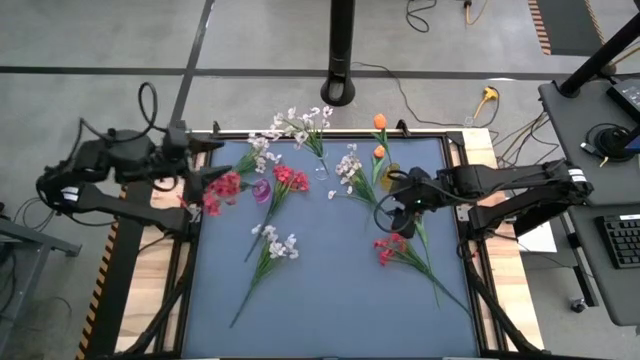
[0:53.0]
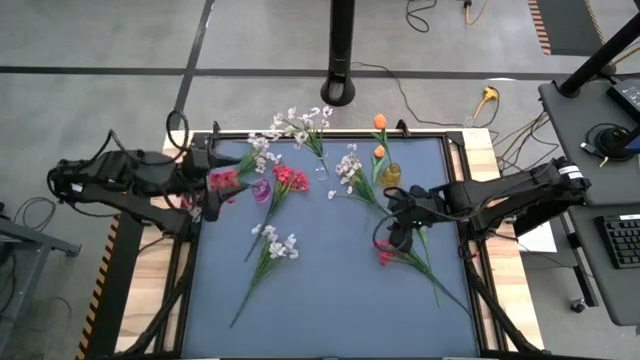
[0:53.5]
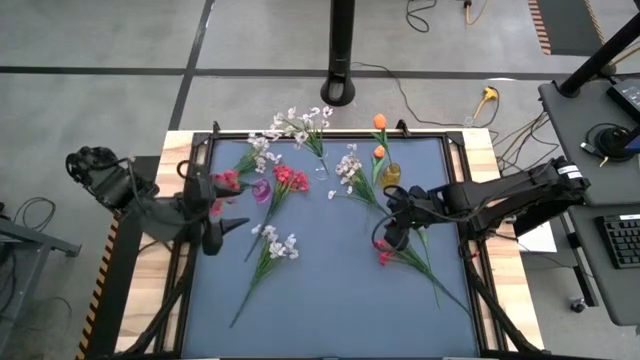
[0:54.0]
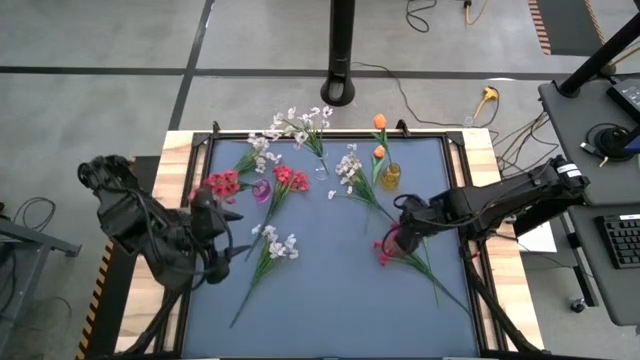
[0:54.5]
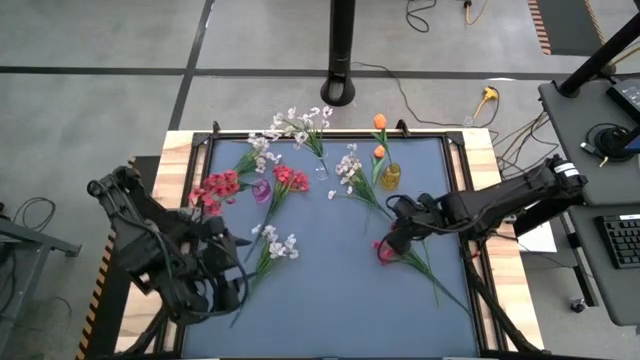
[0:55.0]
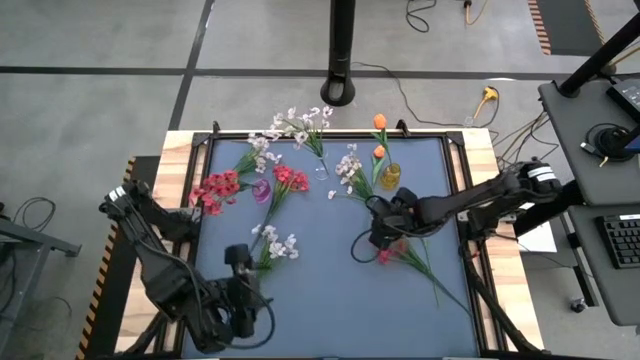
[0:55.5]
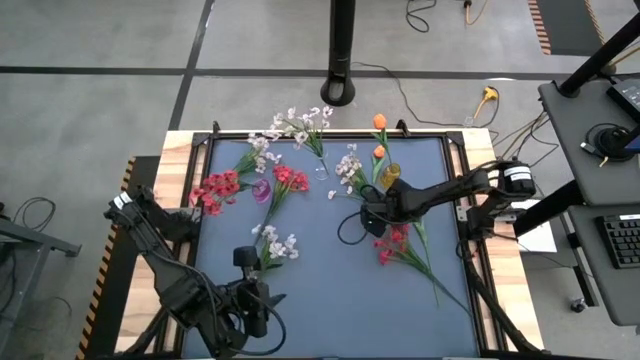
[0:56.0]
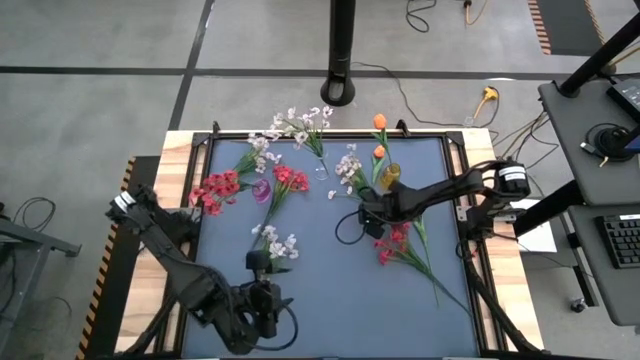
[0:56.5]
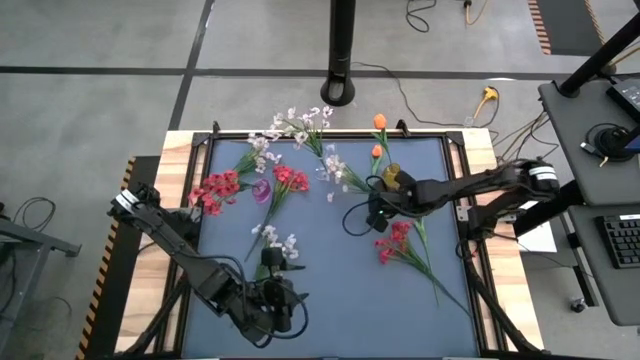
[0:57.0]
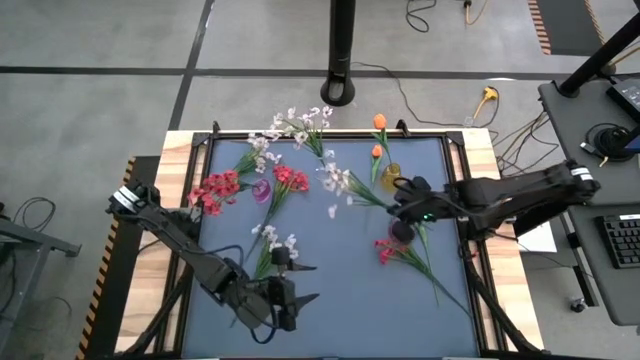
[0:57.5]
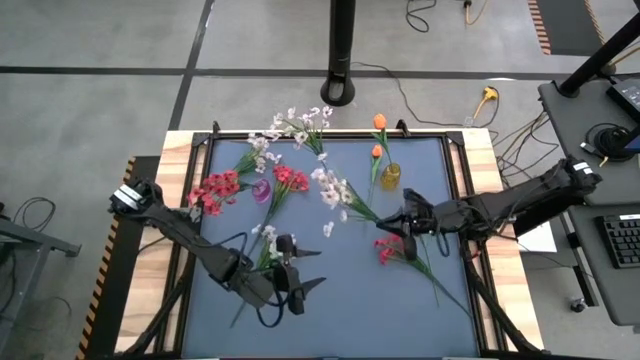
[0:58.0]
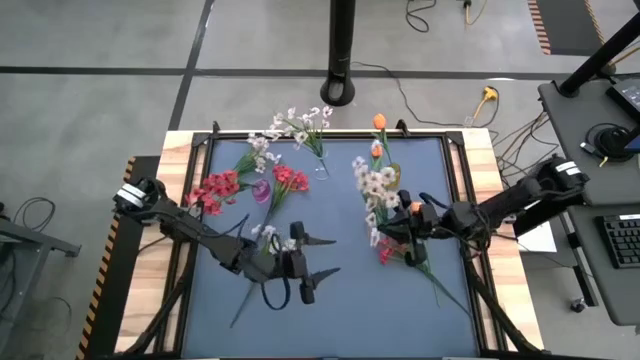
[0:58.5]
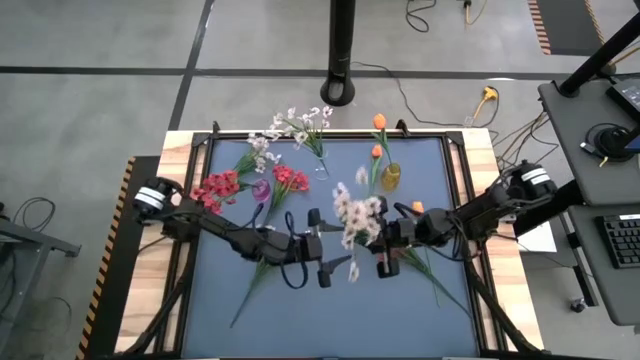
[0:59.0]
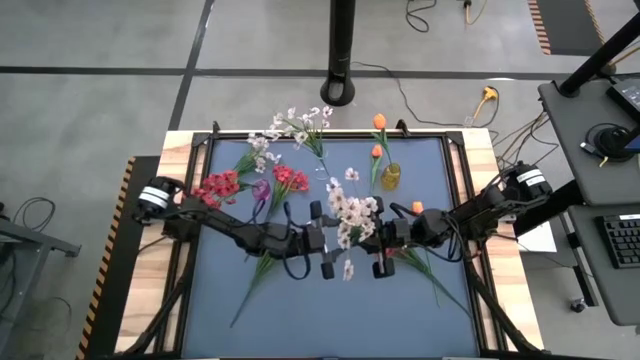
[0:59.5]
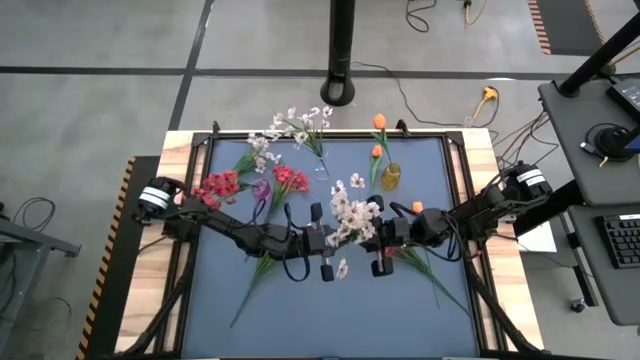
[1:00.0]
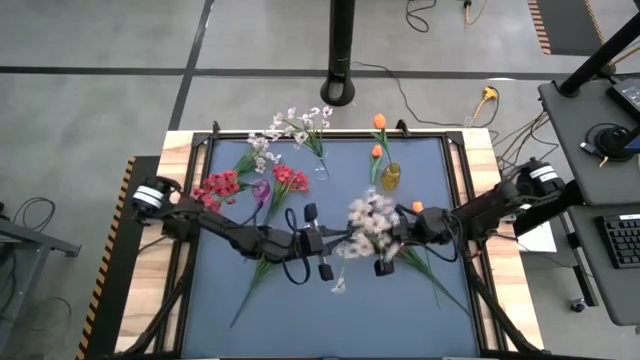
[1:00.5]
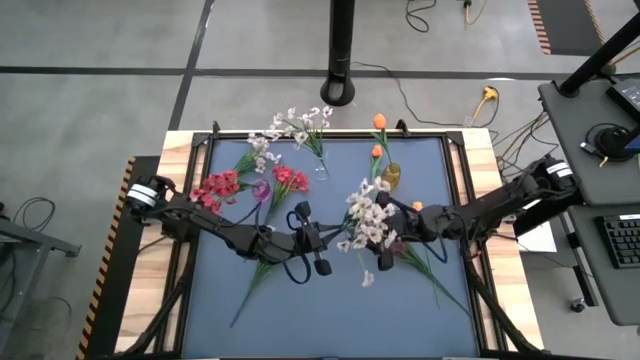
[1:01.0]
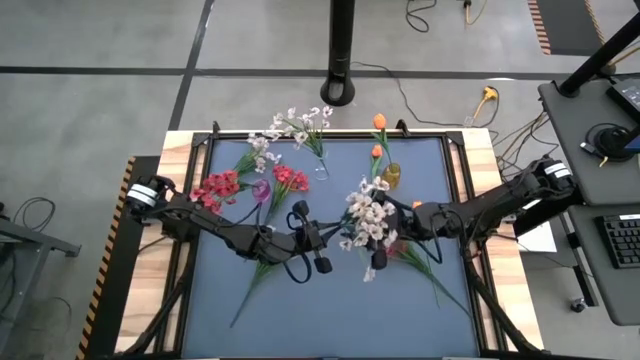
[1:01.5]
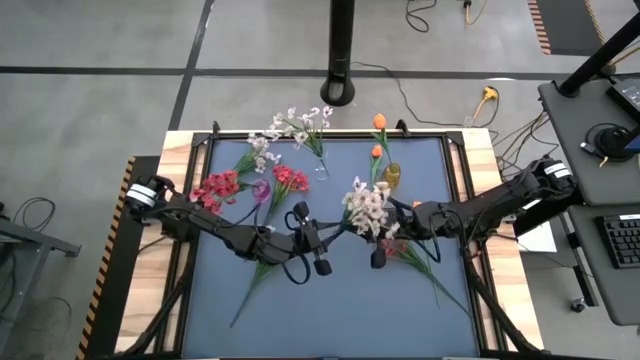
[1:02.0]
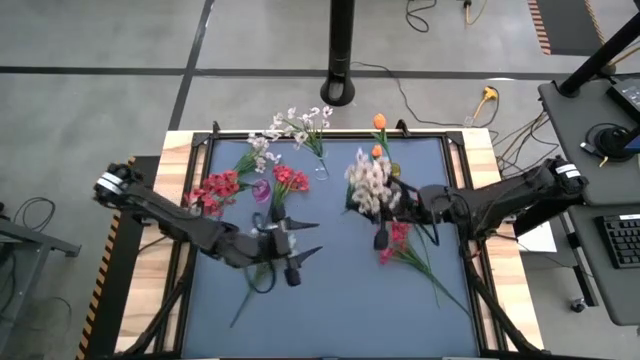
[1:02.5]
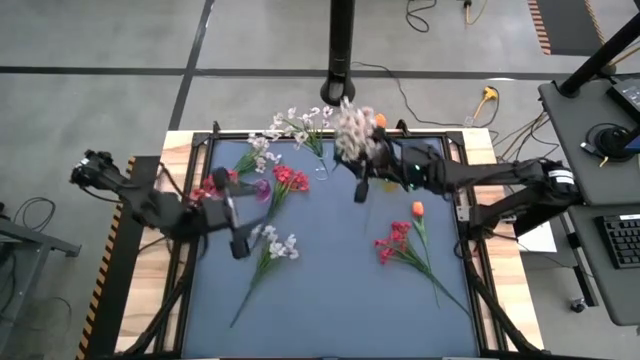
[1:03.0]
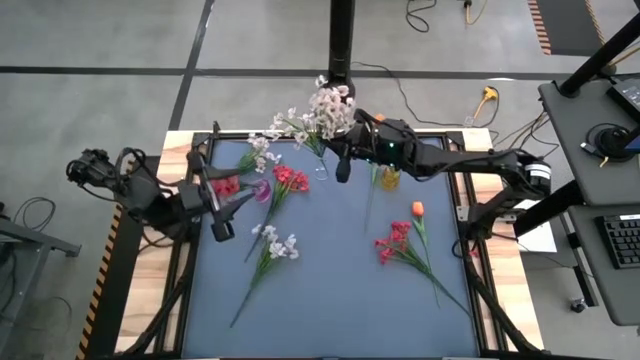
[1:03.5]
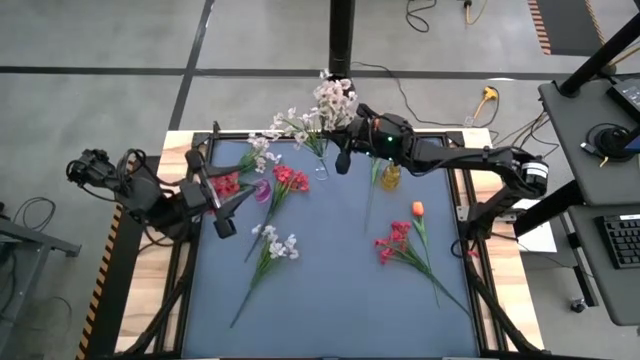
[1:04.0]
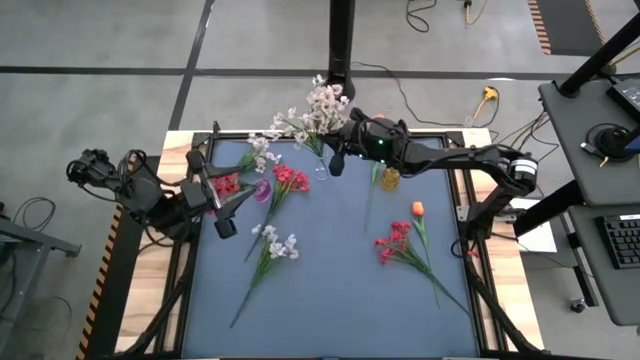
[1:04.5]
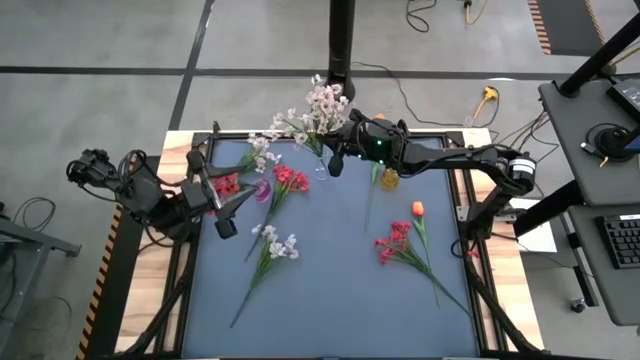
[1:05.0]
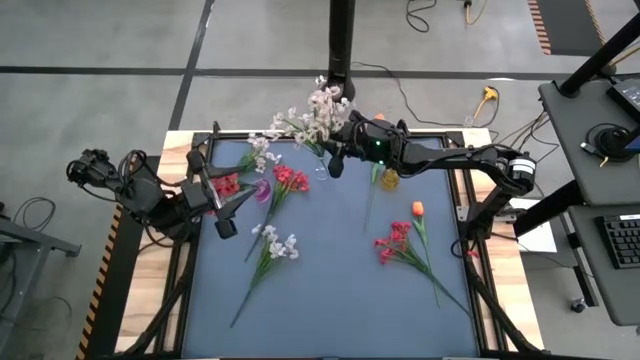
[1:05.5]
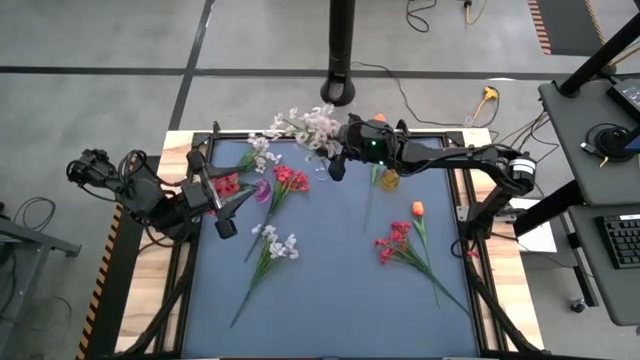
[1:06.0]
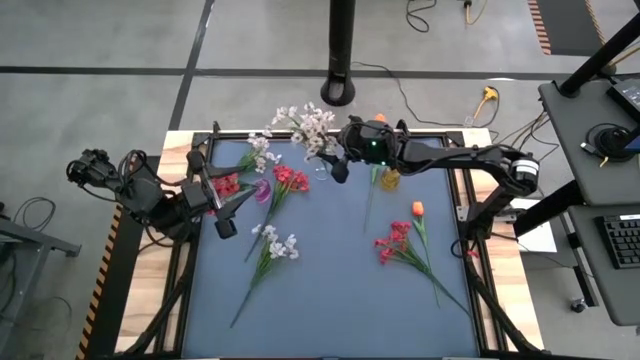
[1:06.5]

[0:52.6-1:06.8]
Task: Sort flowers into vase by color
Put the white flower into the transparent vase

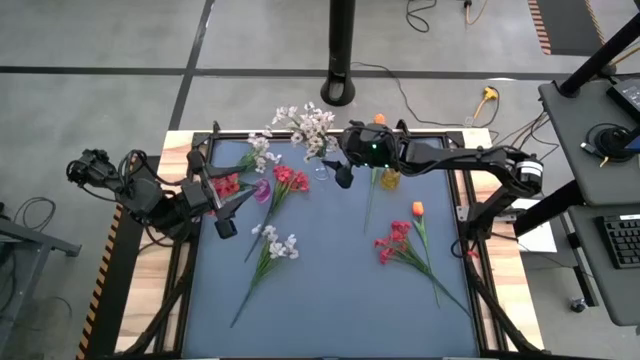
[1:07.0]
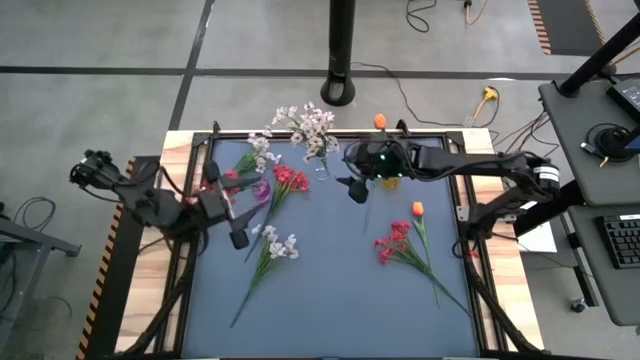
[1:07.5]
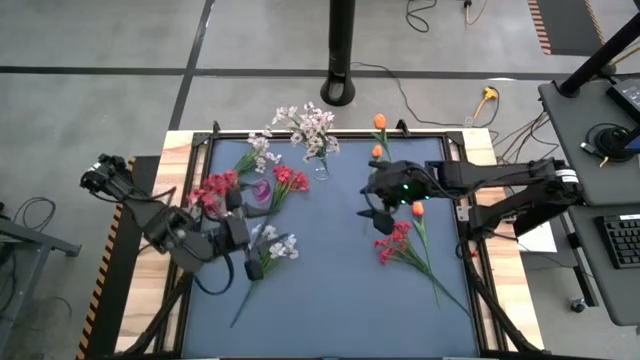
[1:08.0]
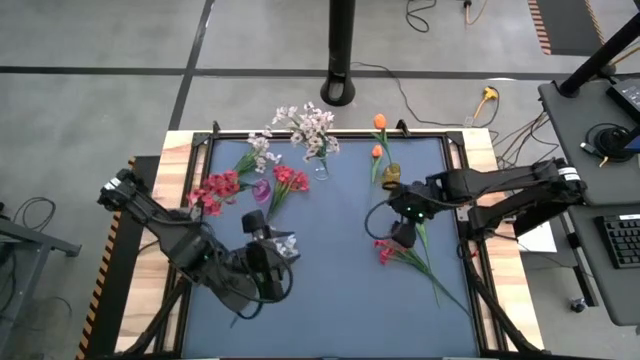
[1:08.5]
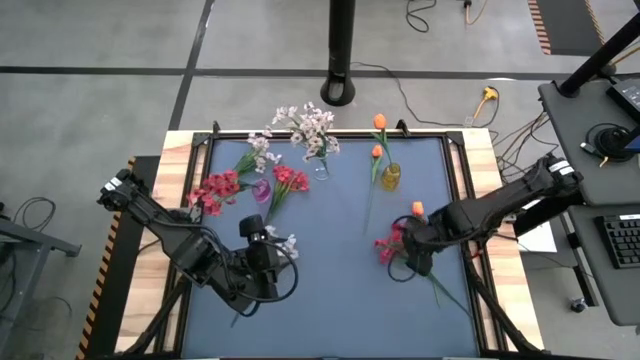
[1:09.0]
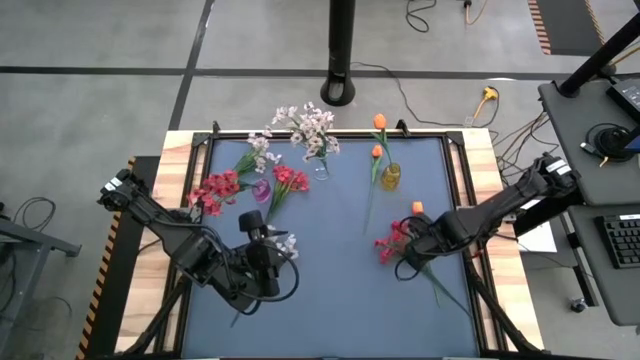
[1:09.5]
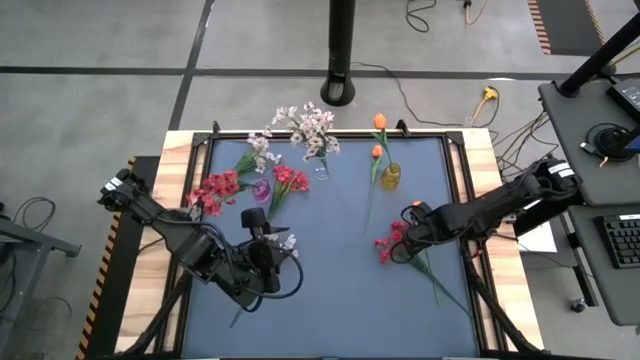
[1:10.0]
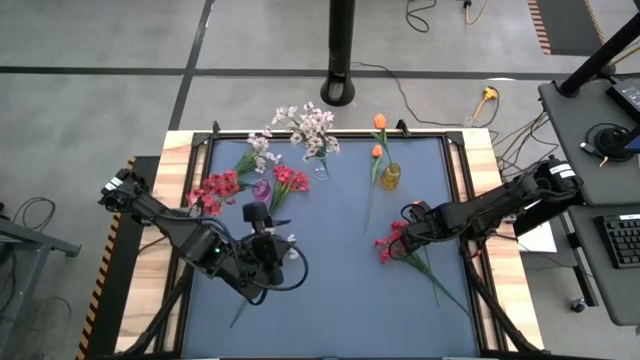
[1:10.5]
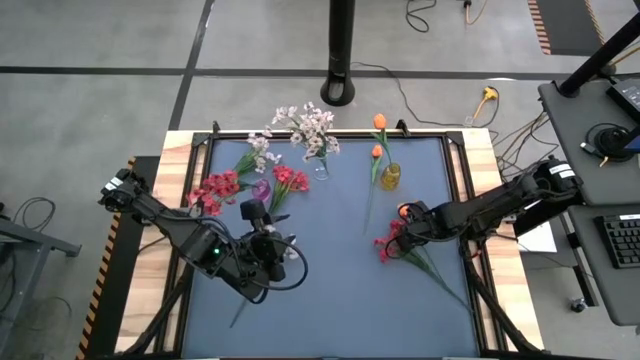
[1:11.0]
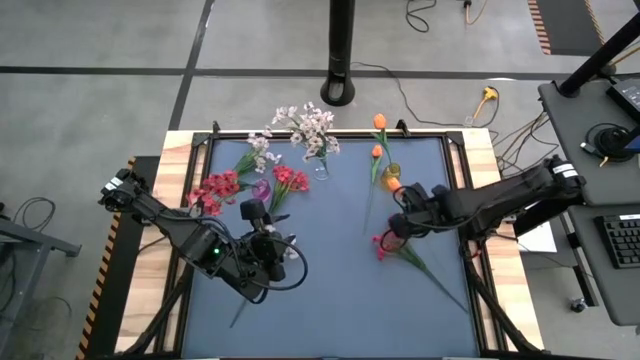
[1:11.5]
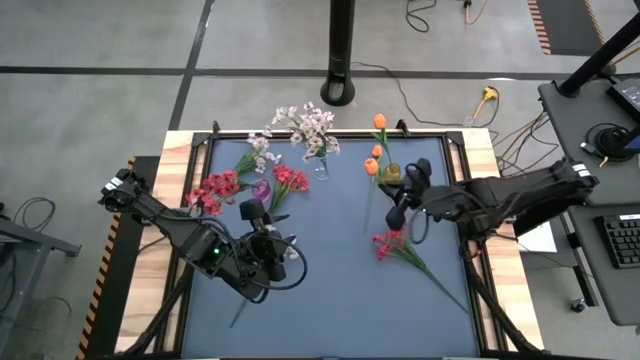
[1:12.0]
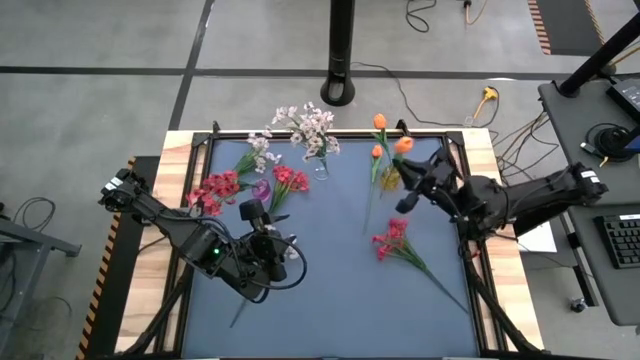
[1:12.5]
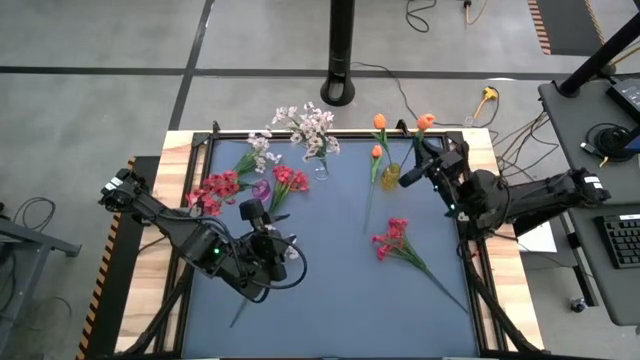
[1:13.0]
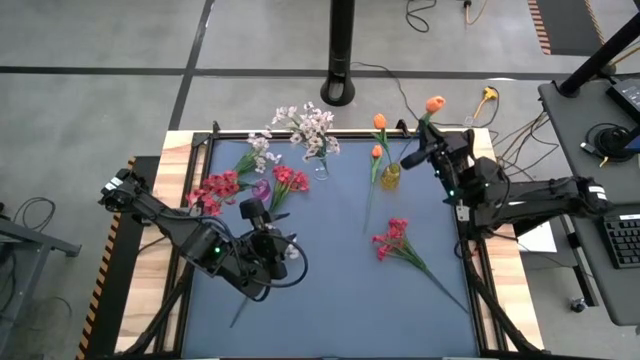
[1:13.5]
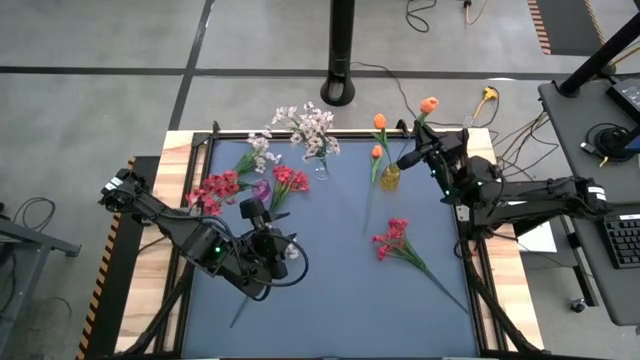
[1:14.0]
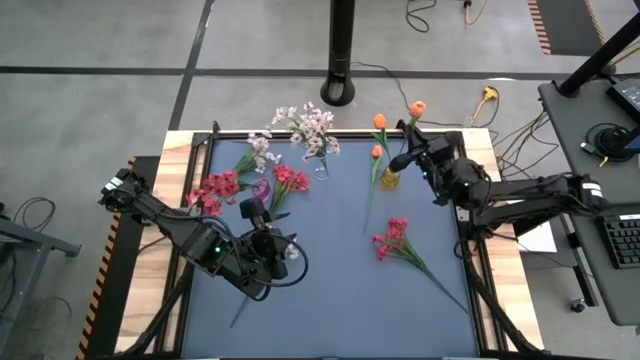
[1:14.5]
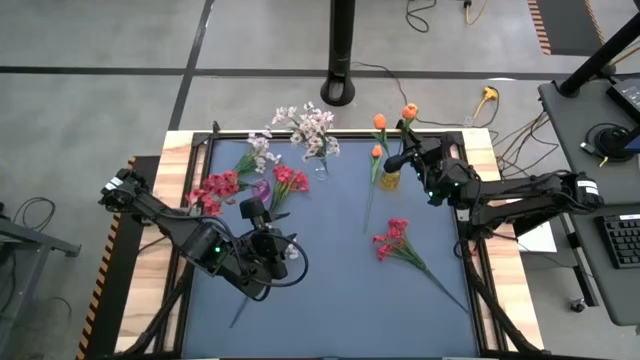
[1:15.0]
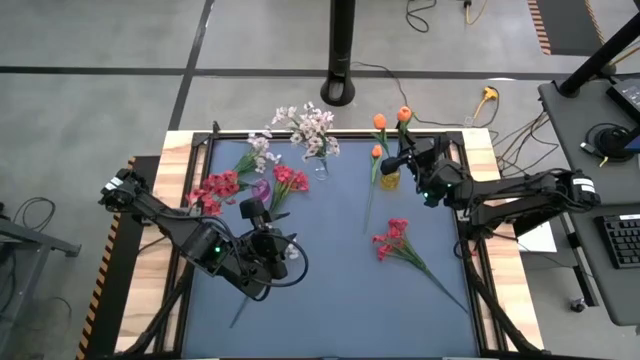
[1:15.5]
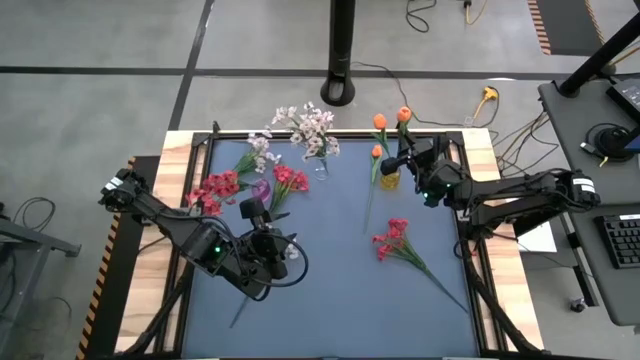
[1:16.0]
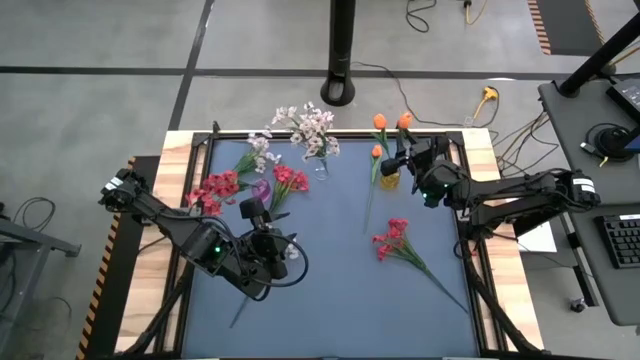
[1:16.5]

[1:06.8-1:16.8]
Put the orange tulip into the yellow vase
